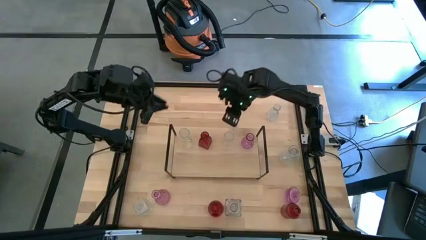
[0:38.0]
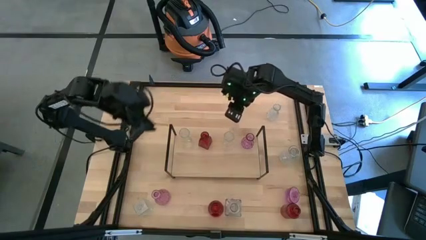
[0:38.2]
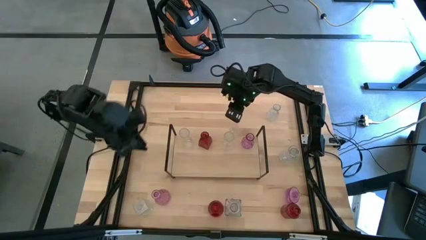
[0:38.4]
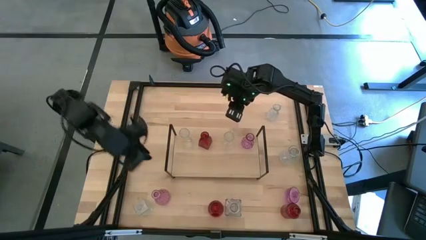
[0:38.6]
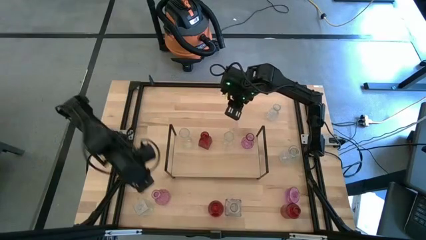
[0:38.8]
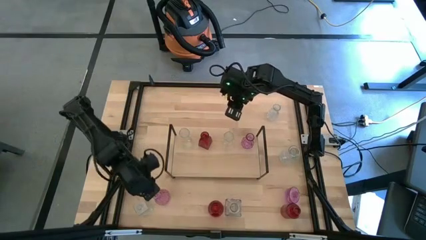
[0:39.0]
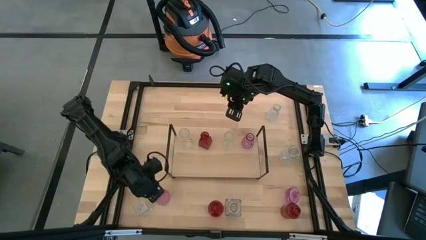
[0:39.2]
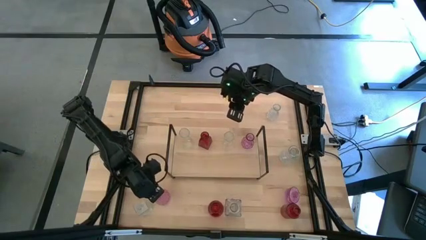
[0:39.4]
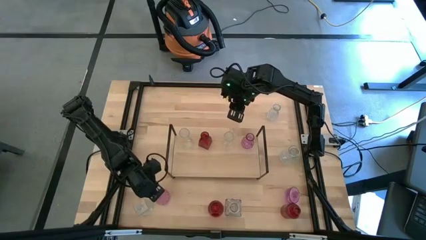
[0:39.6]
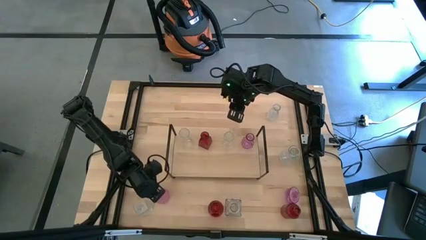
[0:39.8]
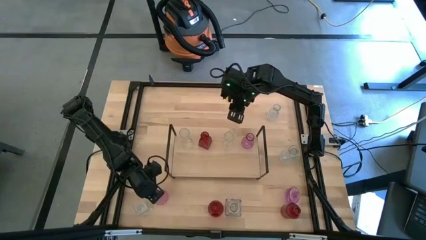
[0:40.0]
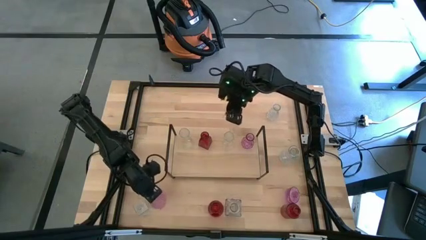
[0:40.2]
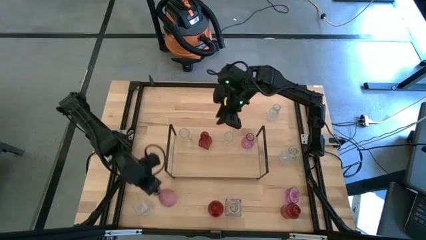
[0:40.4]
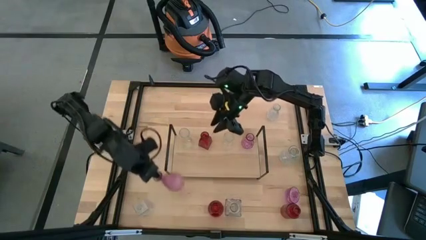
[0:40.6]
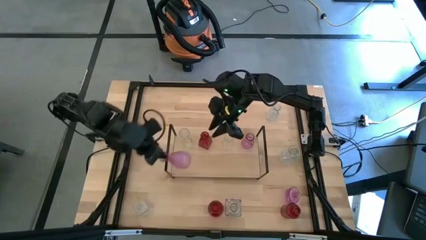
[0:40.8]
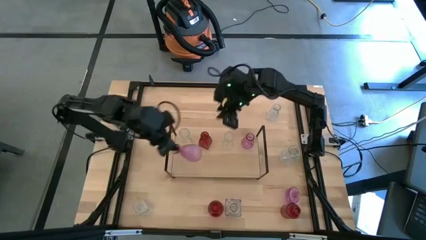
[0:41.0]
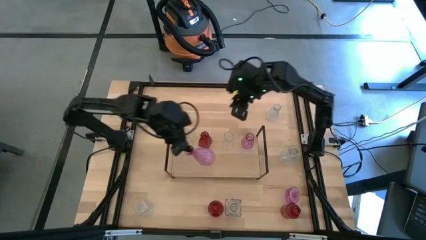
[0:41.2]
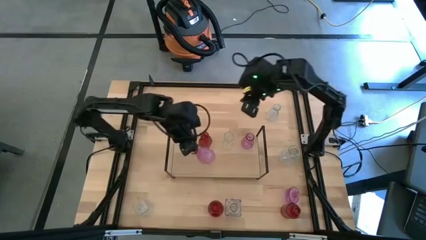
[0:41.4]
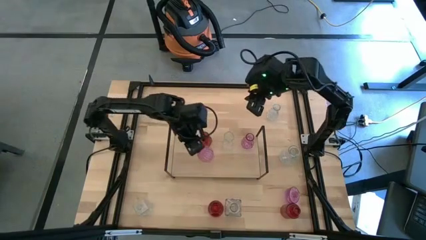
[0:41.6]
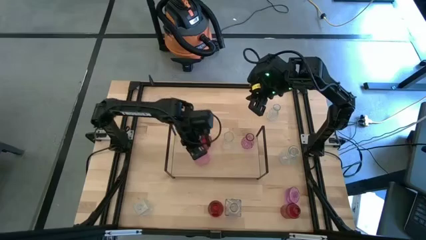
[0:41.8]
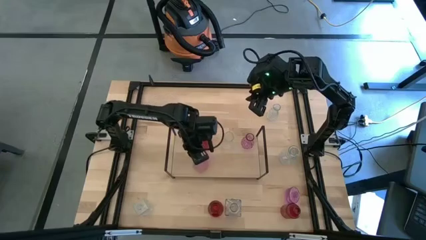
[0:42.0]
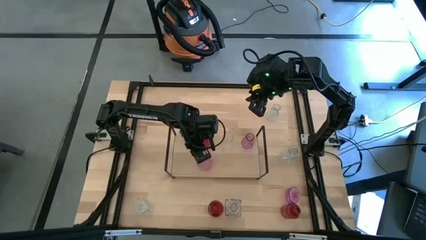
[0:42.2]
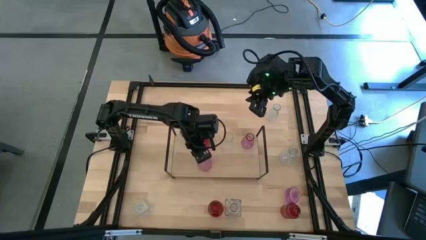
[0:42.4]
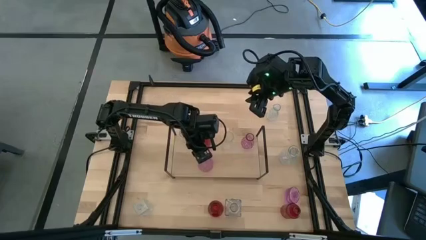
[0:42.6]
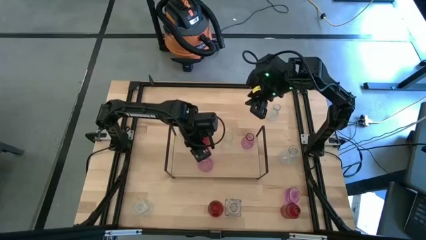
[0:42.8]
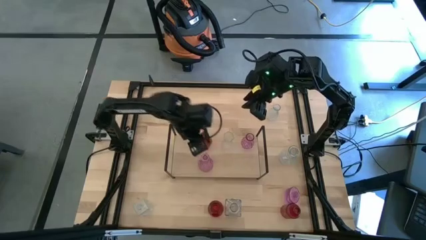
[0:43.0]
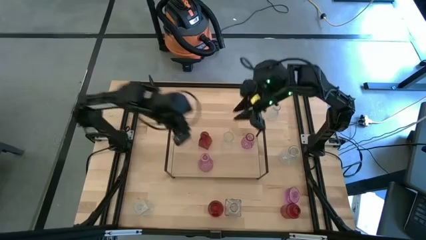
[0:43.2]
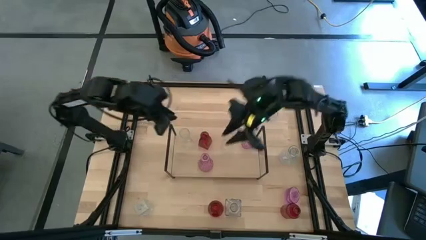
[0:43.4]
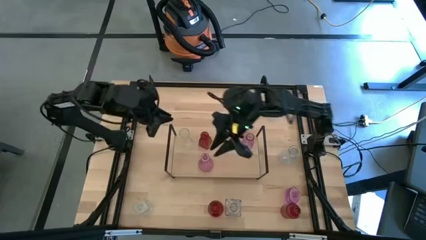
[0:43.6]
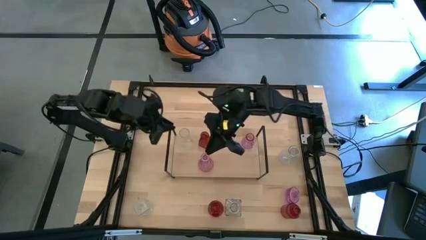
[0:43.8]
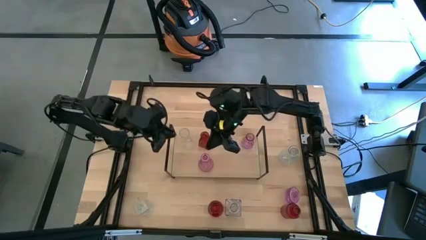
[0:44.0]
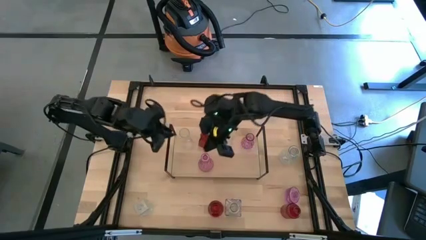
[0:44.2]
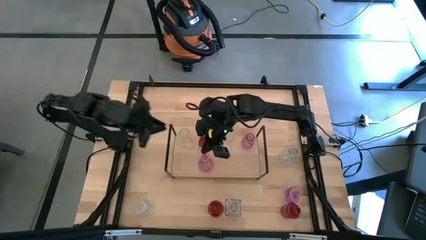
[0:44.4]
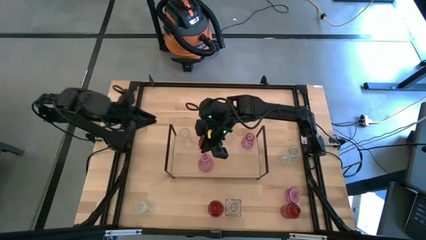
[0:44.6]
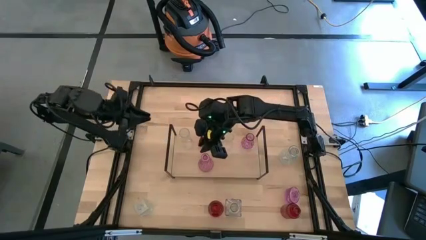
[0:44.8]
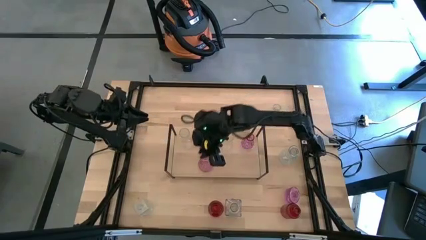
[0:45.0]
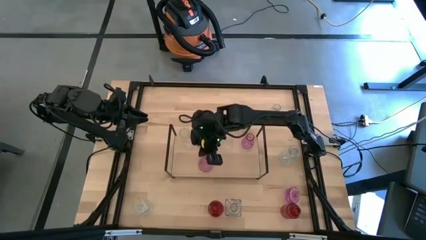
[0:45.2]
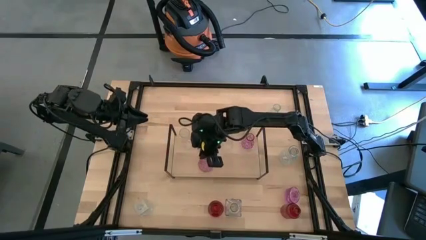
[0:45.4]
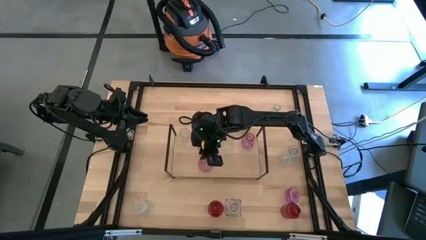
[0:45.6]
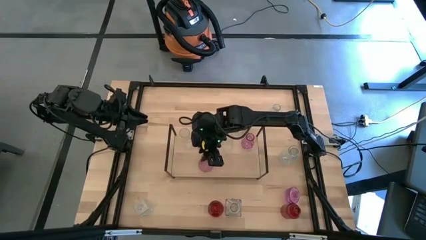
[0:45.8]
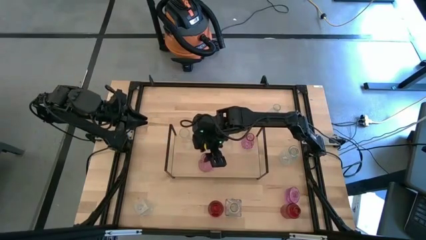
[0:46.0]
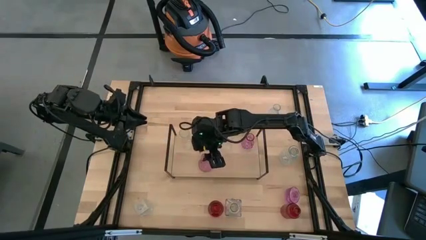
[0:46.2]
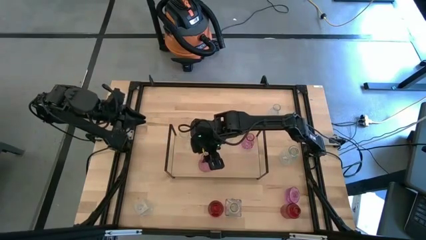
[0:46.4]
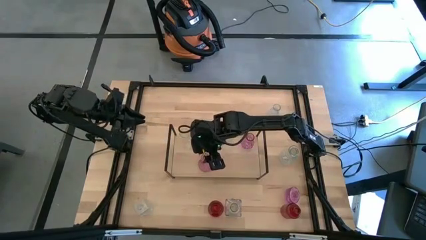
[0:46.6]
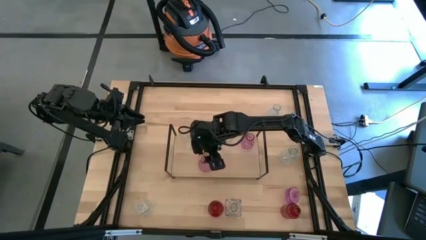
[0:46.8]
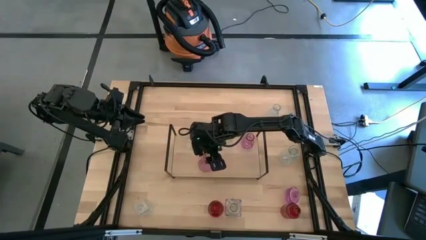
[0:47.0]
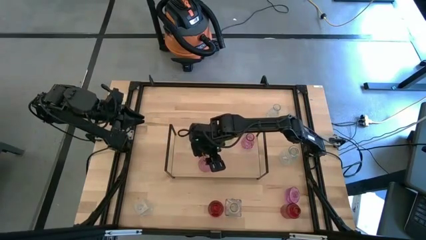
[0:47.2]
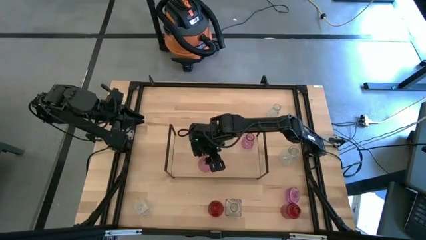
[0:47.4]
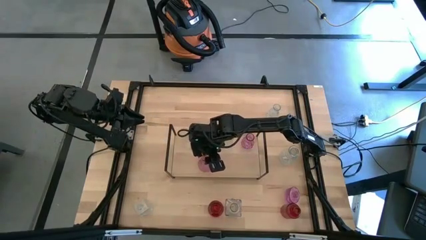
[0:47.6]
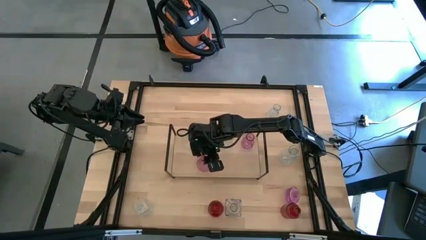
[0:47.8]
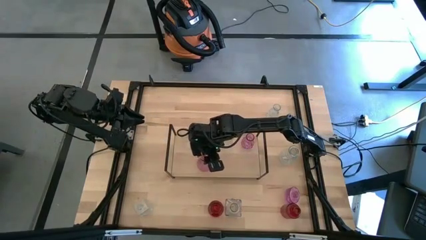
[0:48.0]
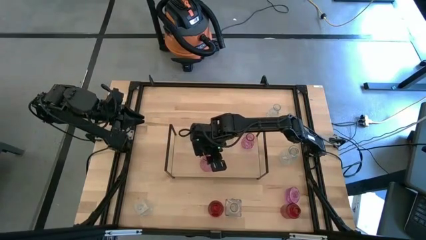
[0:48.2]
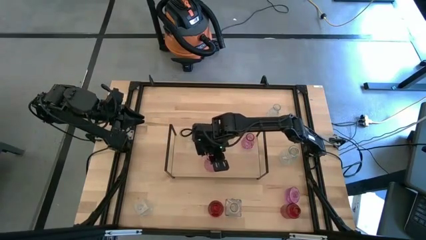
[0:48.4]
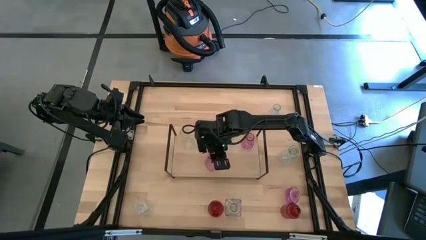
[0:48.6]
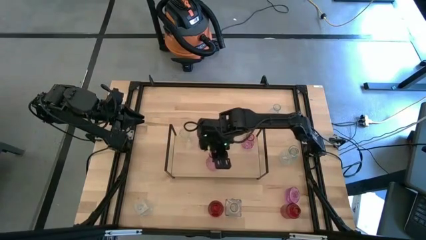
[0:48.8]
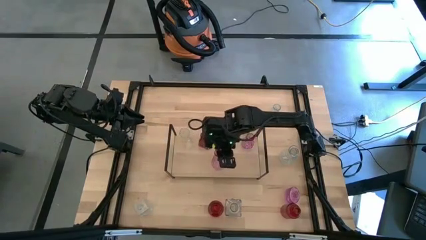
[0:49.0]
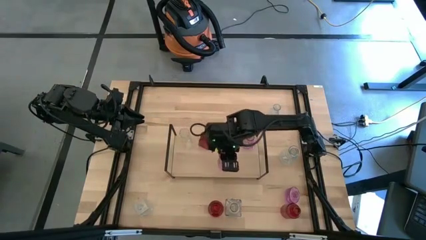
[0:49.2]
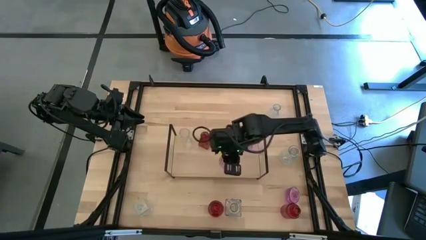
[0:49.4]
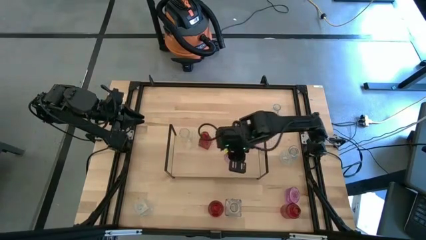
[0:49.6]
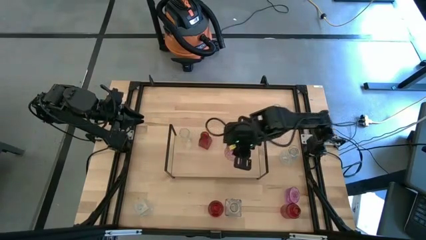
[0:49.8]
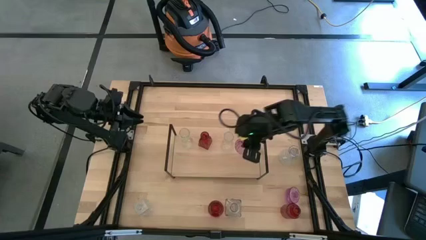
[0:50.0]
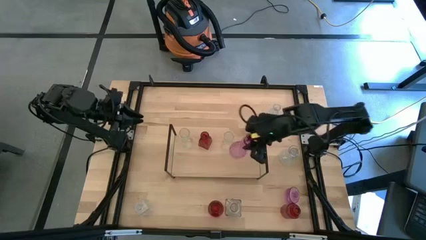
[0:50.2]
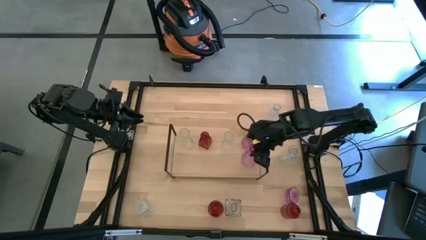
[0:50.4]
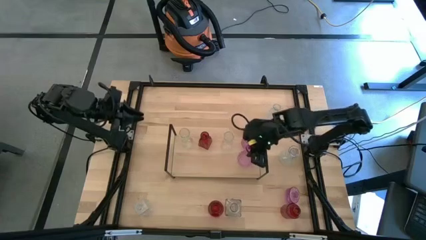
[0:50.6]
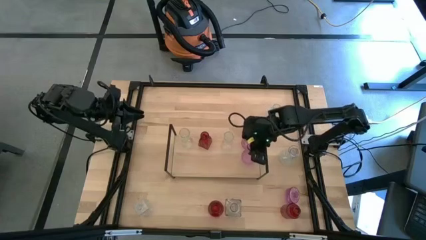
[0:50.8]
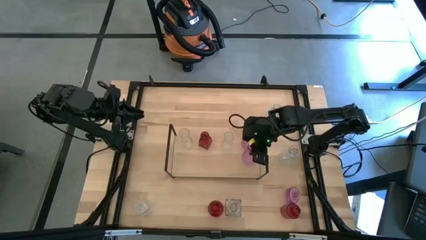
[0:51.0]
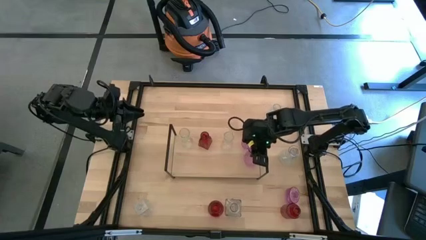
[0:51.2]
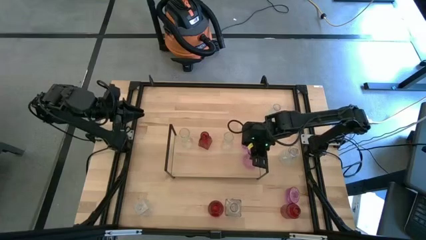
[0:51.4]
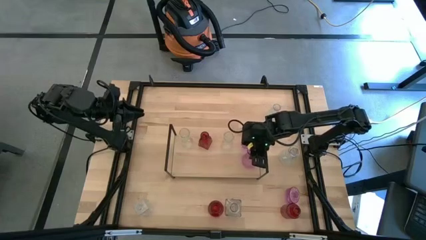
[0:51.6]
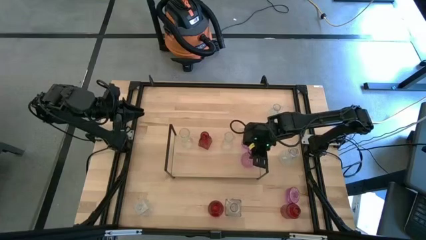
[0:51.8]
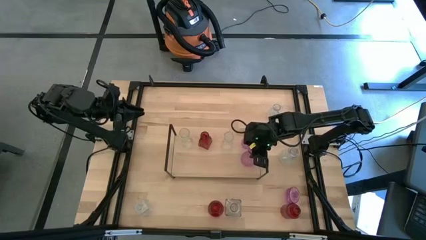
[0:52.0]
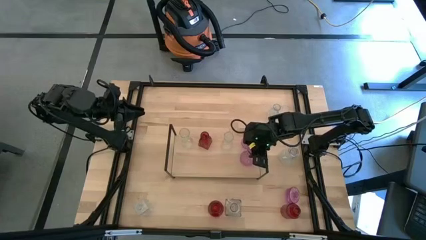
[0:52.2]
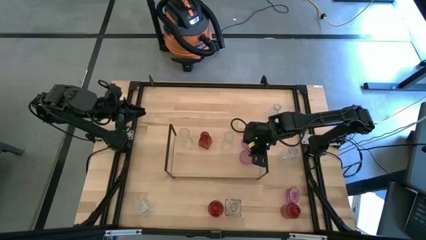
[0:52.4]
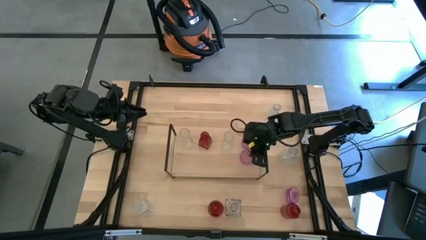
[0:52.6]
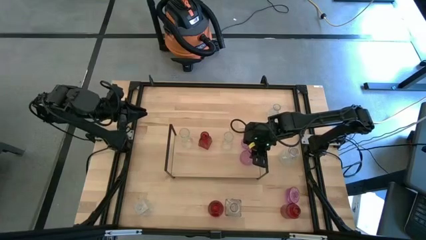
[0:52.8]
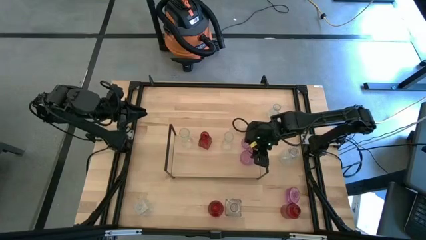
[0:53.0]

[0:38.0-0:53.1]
Task: sort vases onto shelf
Put the left purple flower vase on the shelf aligned with the other purple flower vase
